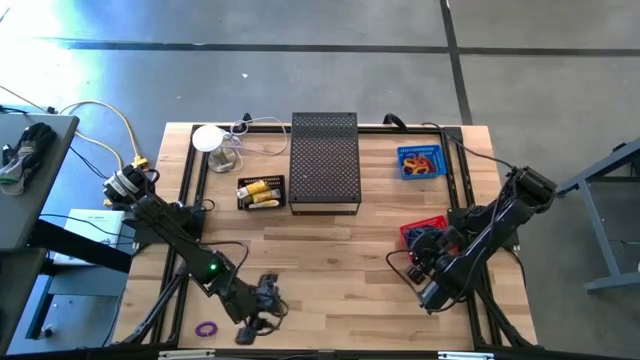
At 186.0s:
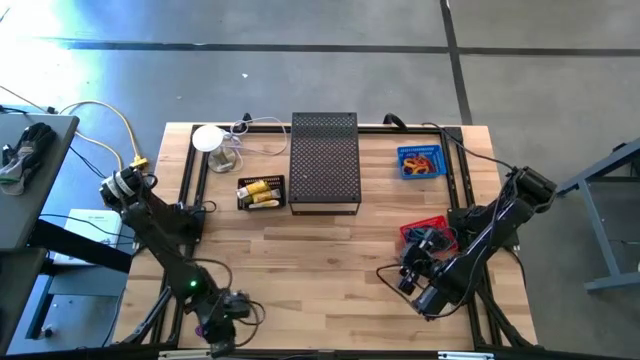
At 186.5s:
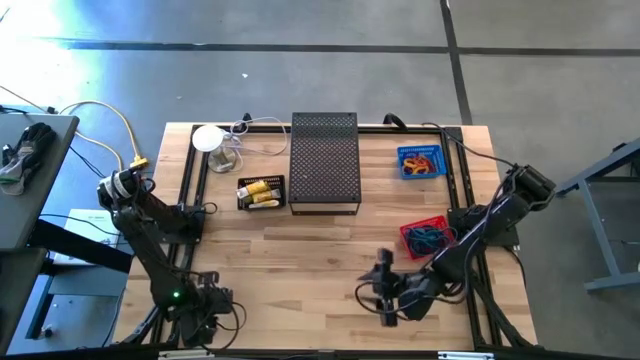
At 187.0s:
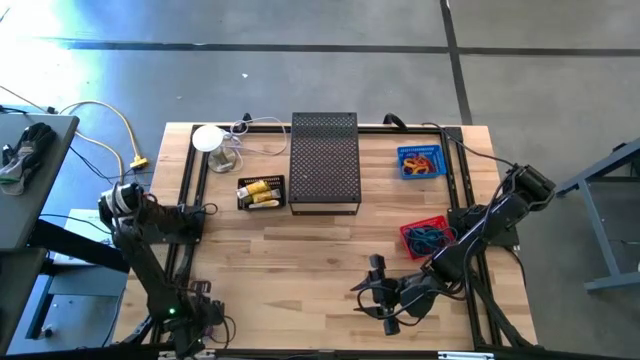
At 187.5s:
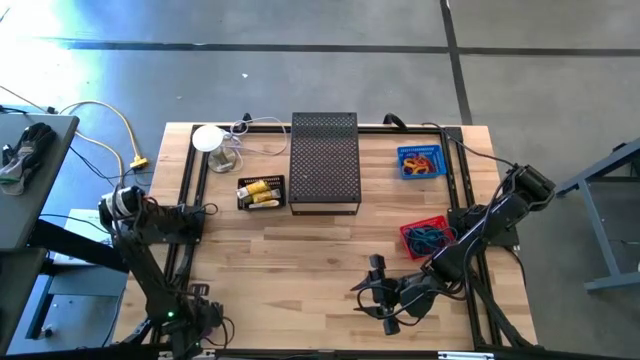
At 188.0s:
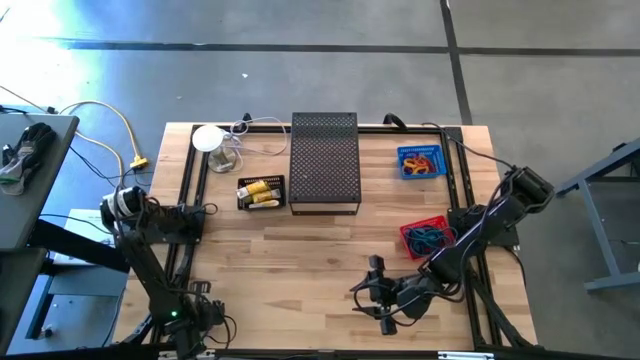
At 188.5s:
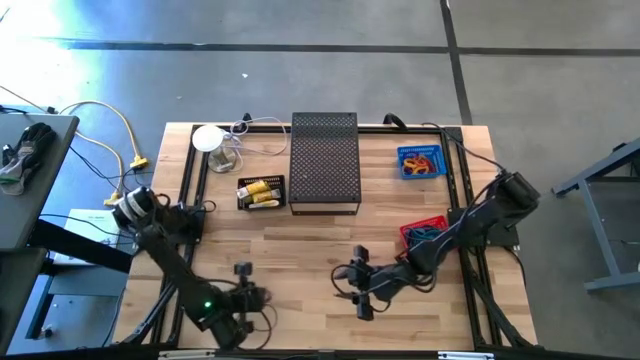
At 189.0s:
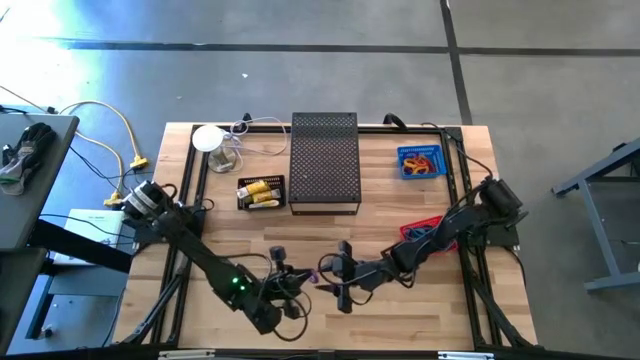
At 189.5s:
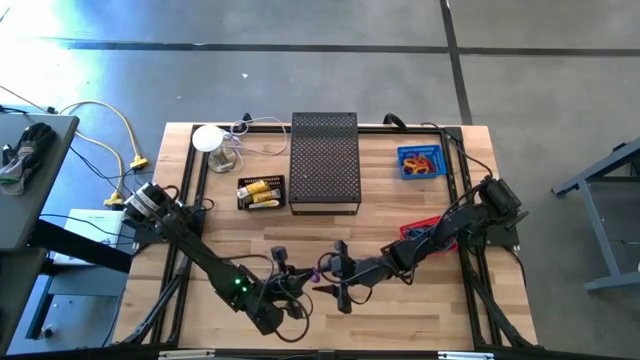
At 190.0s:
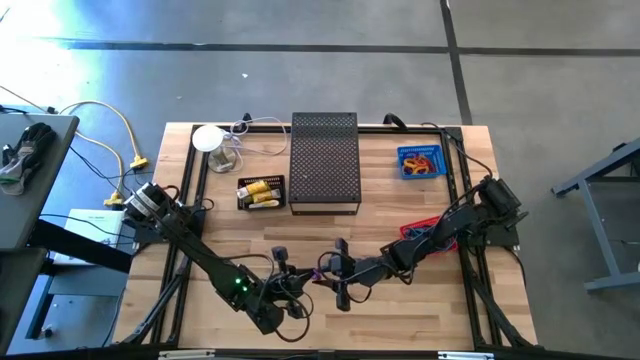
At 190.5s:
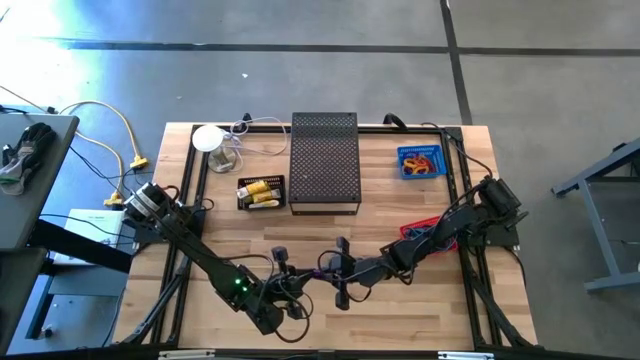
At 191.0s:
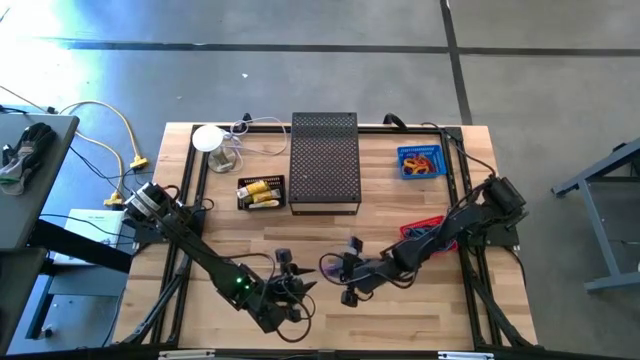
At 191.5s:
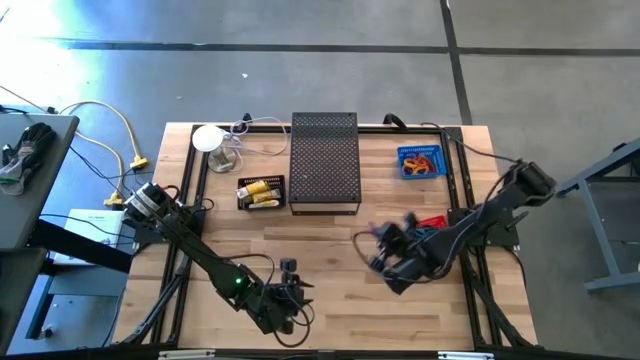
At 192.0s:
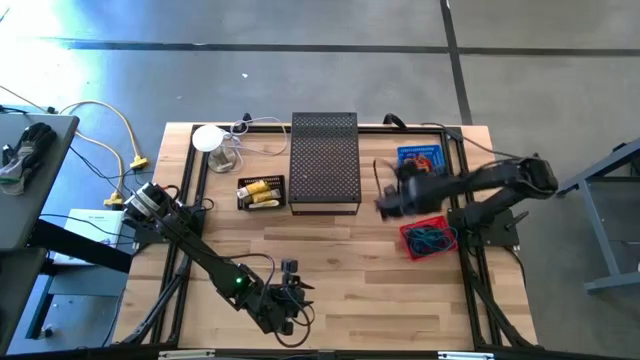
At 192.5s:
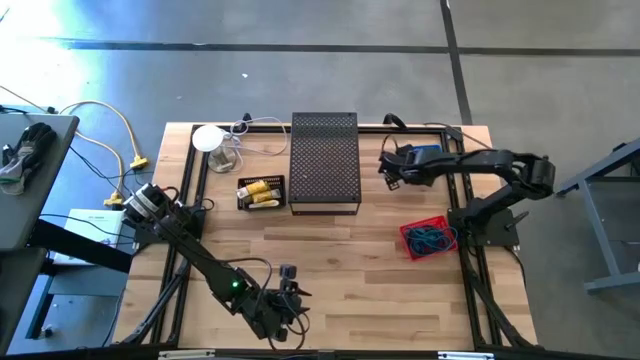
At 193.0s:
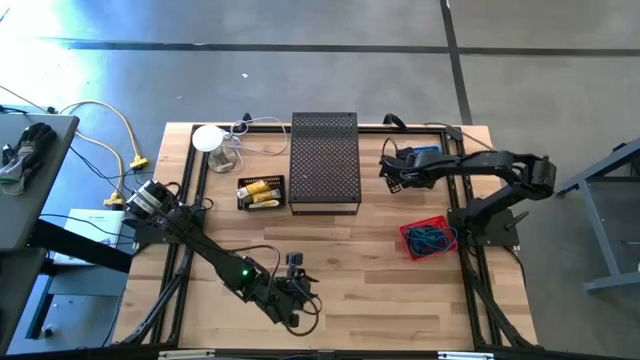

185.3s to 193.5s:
Task: Pick & Place Office Desk Supplies
Put the violet spring keychain into the blue bin

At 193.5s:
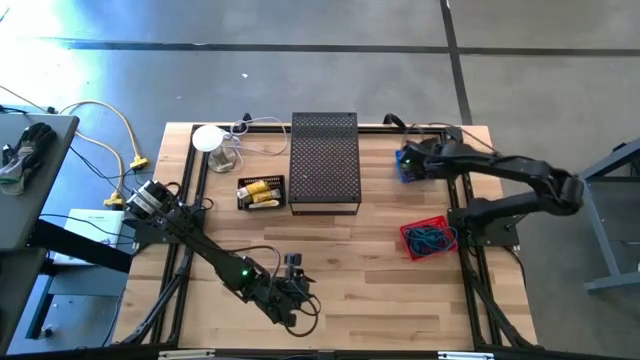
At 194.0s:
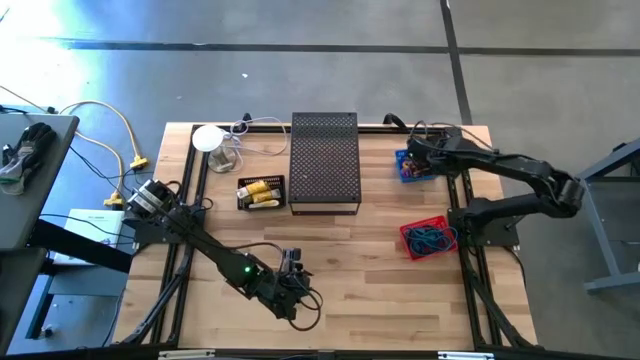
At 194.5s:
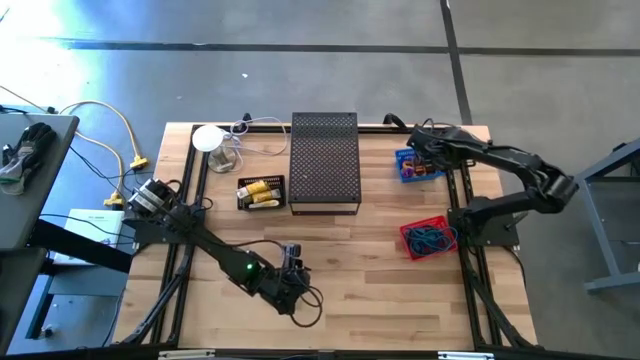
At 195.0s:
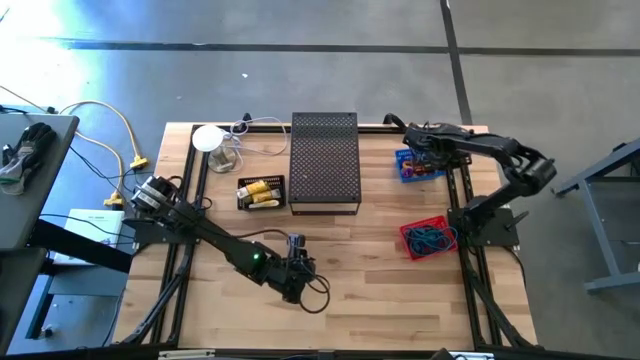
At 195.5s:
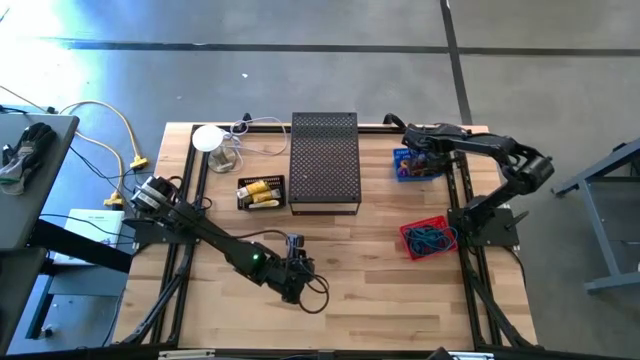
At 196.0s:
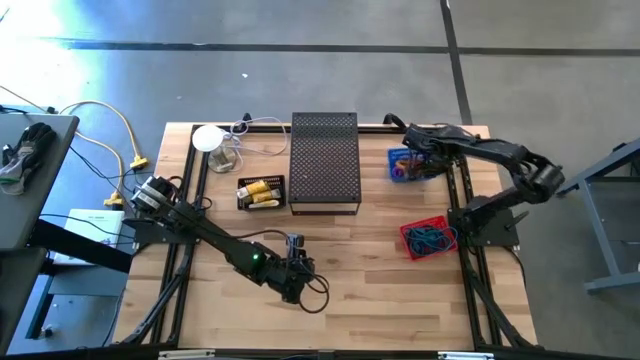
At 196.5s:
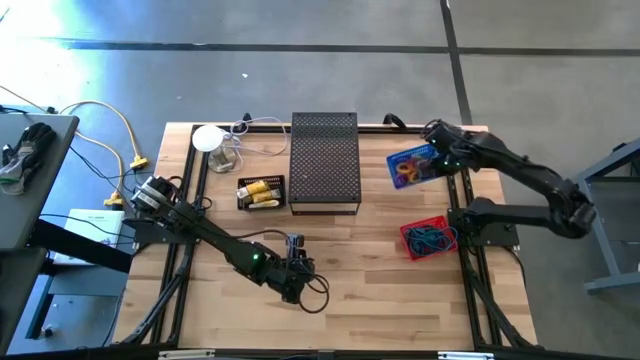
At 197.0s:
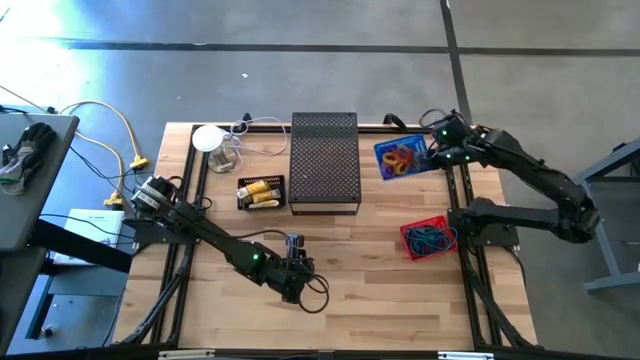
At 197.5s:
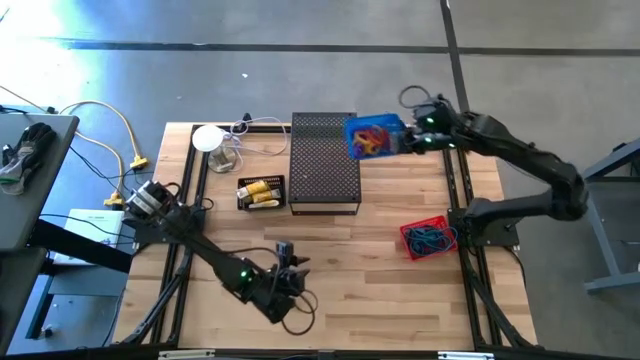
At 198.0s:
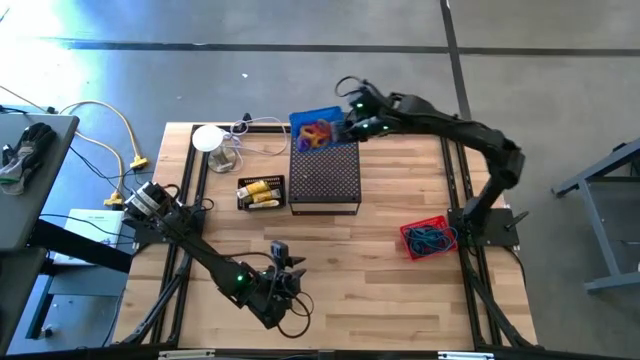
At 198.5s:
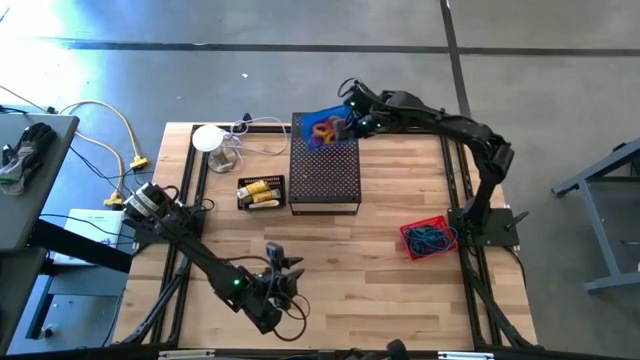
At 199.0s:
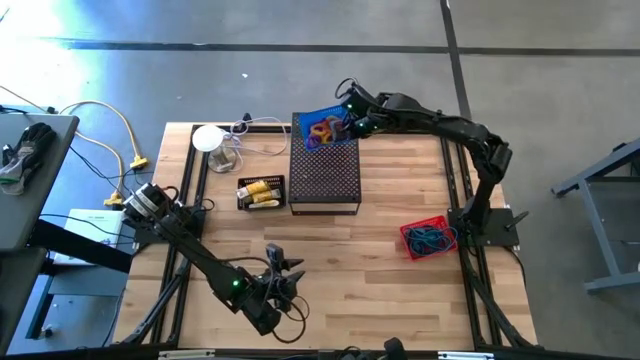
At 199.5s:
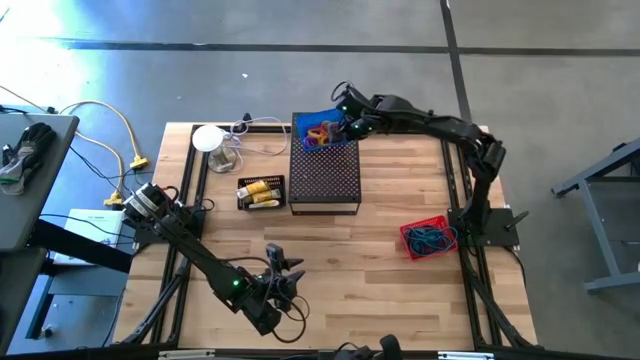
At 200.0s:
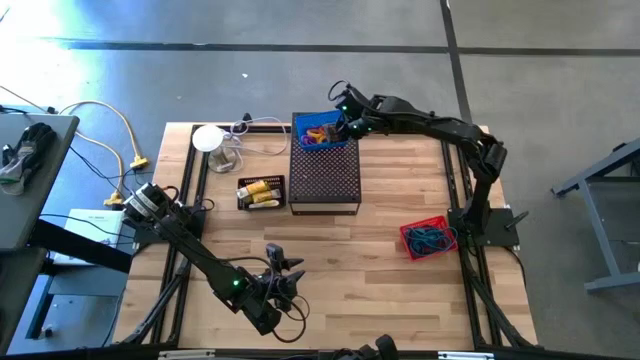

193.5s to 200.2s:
Put the blue bin on the shelf

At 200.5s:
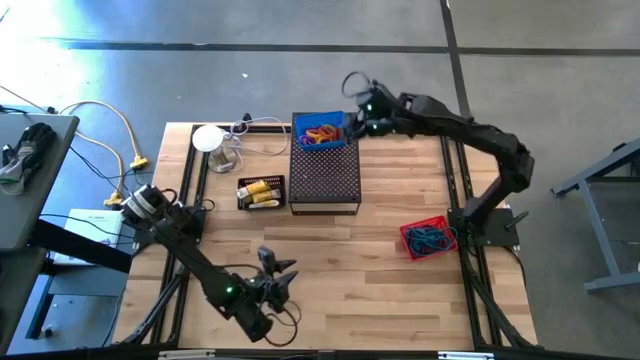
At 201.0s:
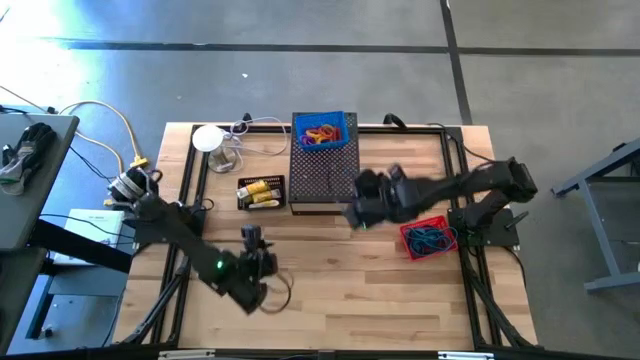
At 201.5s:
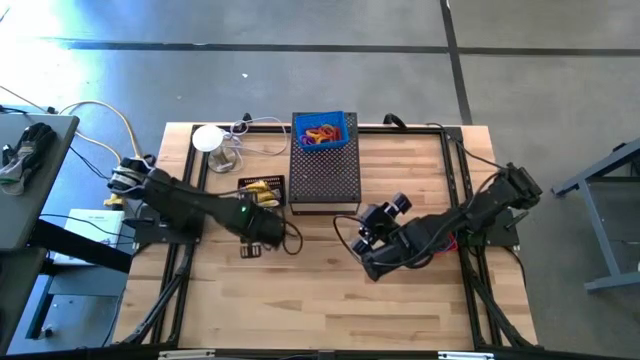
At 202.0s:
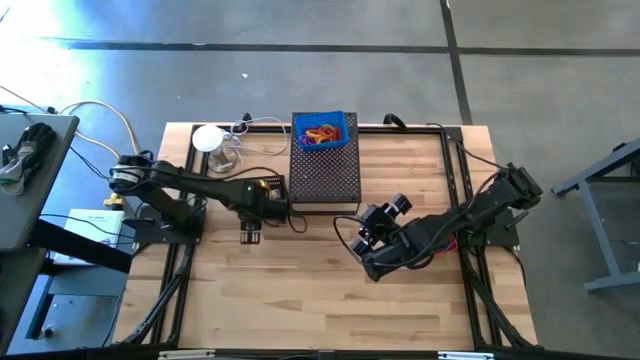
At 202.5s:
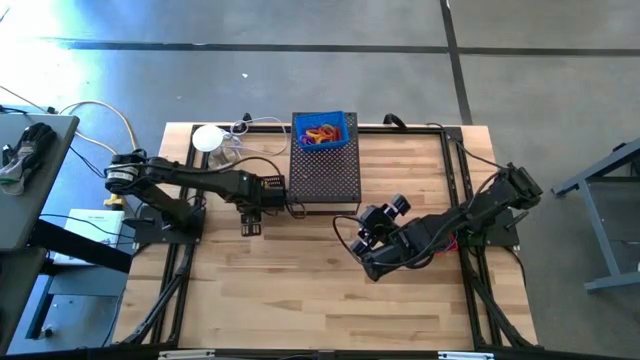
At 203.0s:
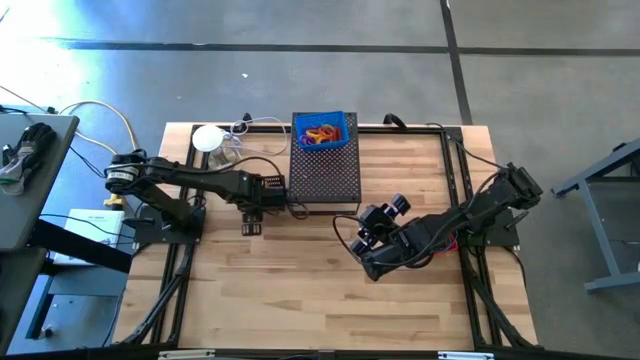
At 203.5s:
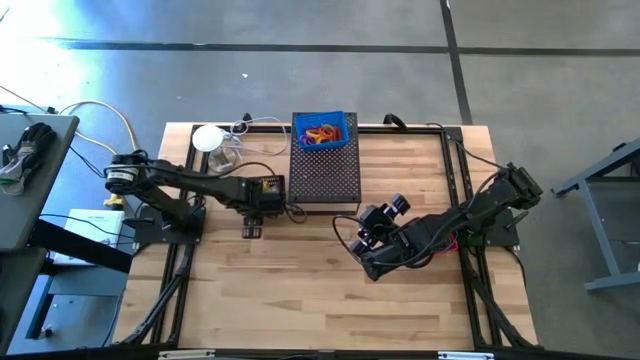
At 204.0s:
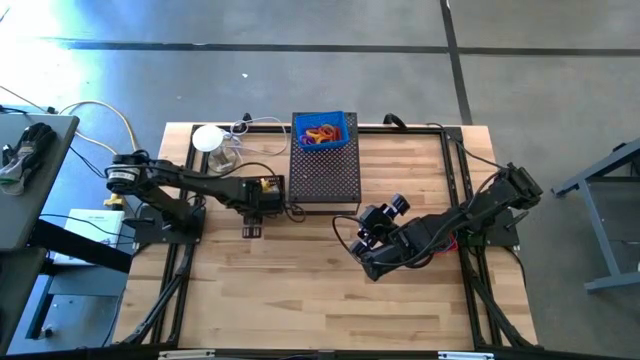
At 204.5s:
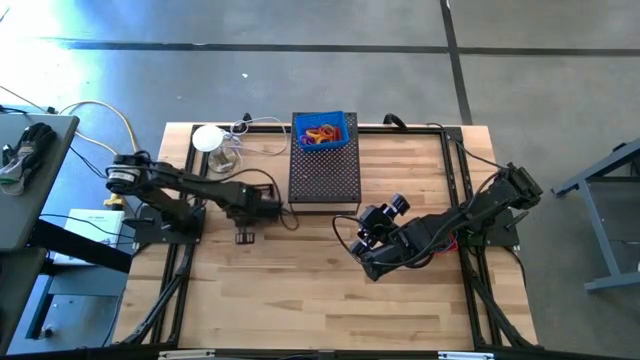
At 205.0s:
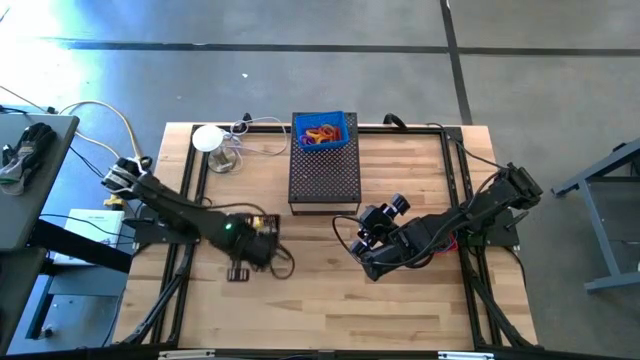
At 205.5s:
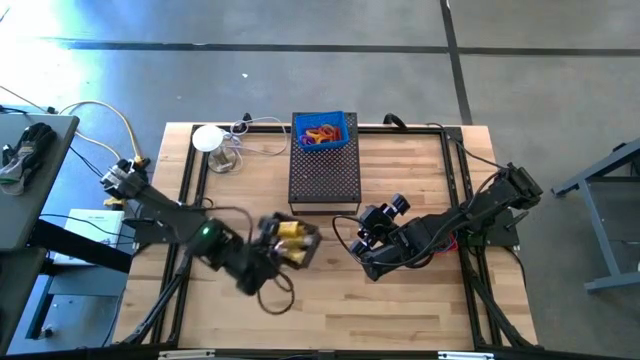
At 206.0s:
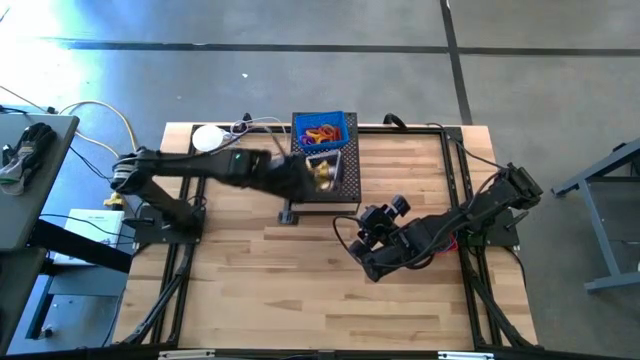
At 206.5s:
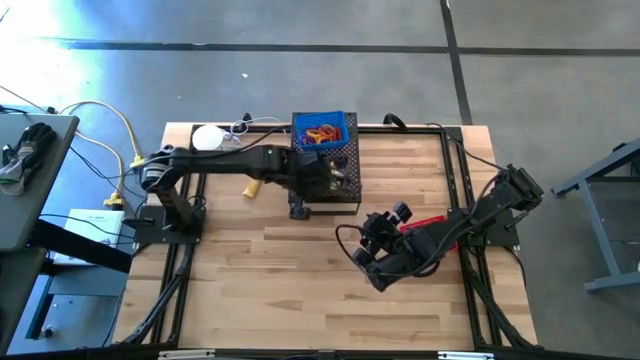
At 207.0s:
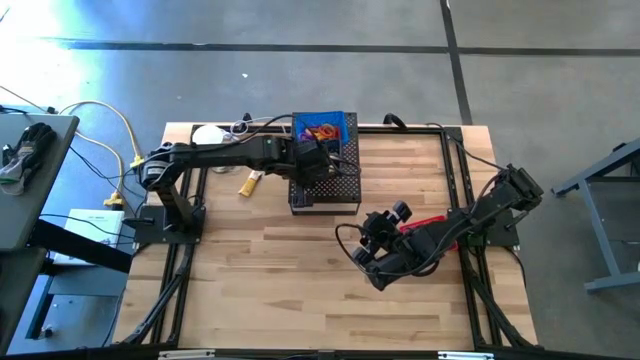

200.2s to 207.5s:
Put the black bin on the shelf
